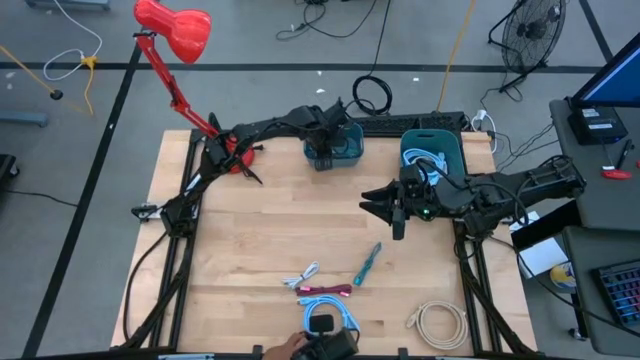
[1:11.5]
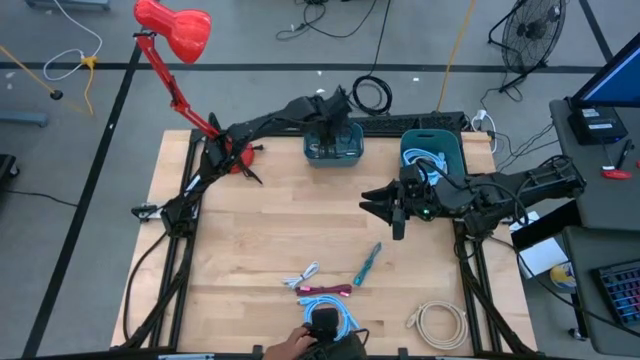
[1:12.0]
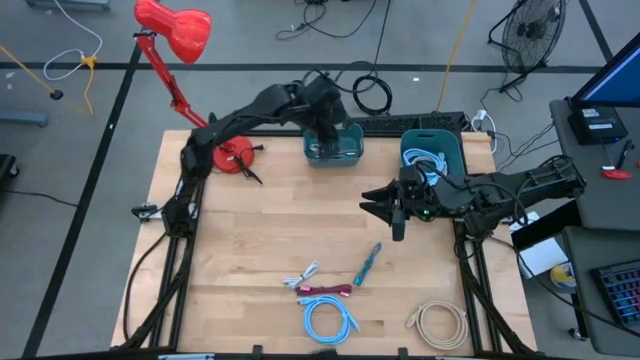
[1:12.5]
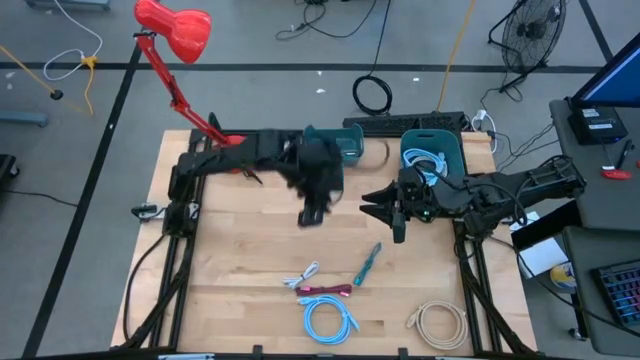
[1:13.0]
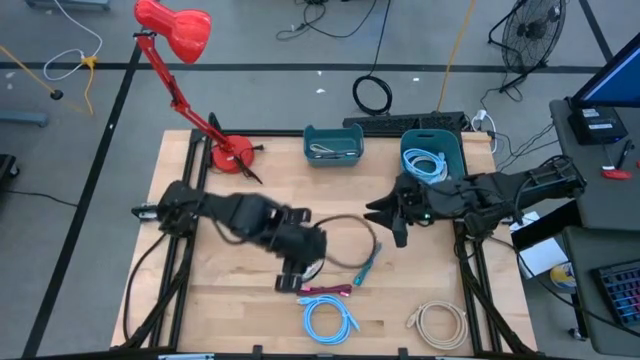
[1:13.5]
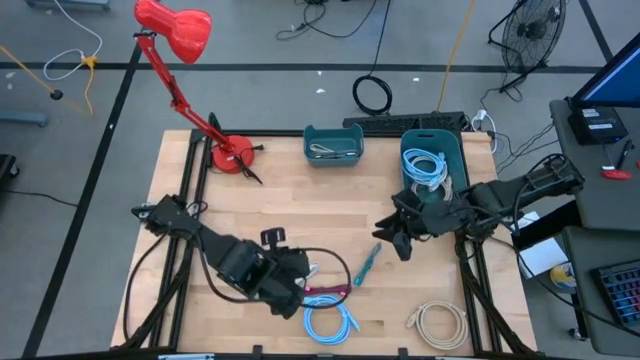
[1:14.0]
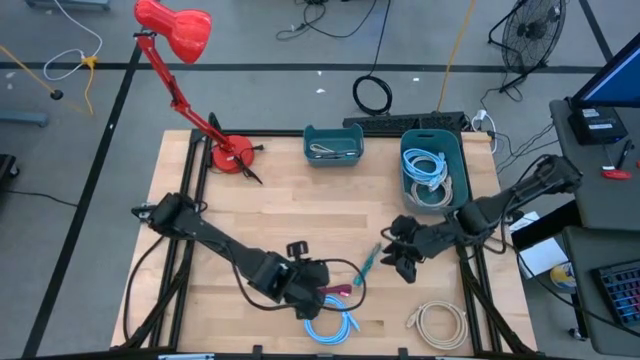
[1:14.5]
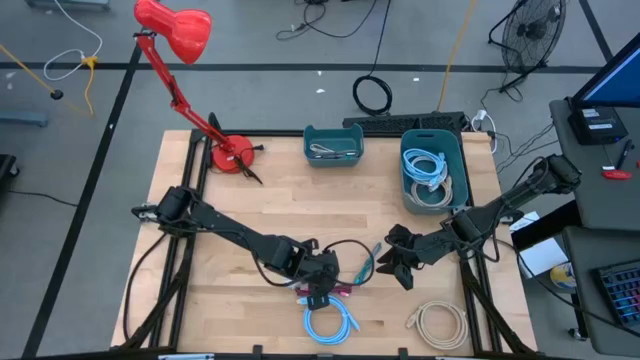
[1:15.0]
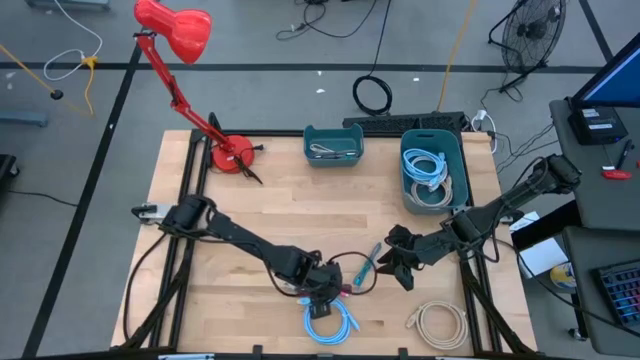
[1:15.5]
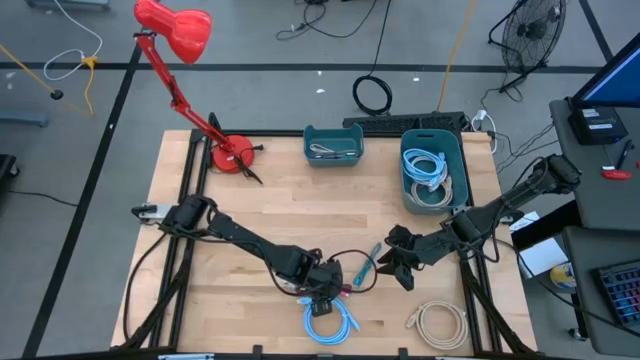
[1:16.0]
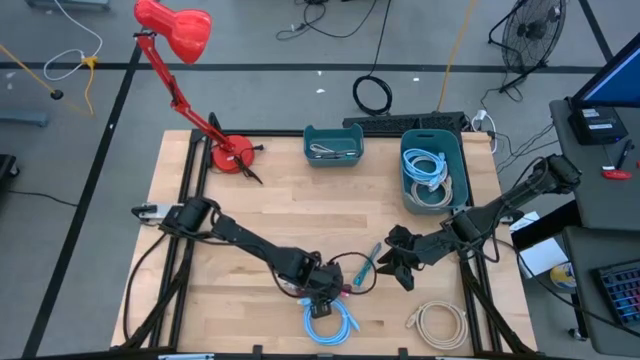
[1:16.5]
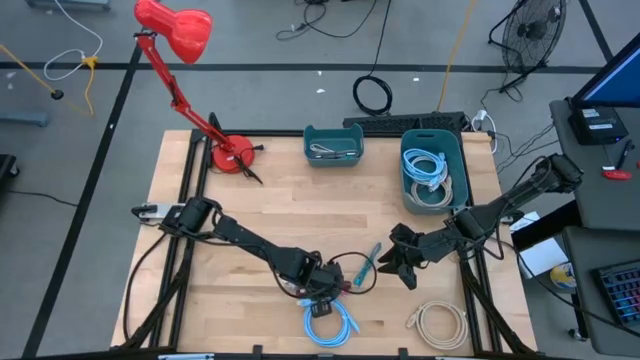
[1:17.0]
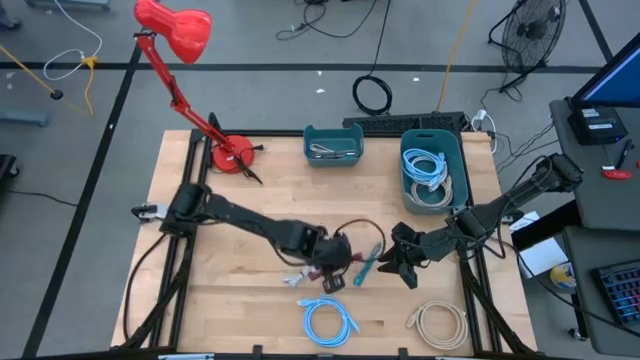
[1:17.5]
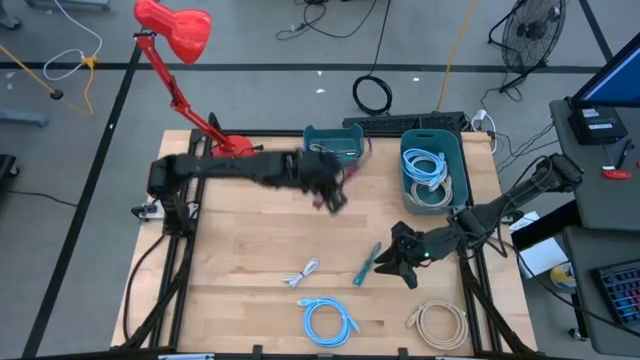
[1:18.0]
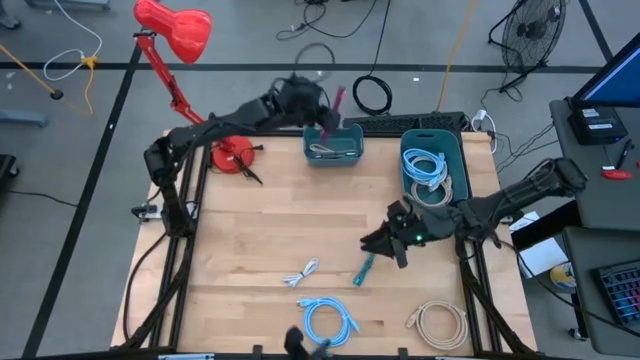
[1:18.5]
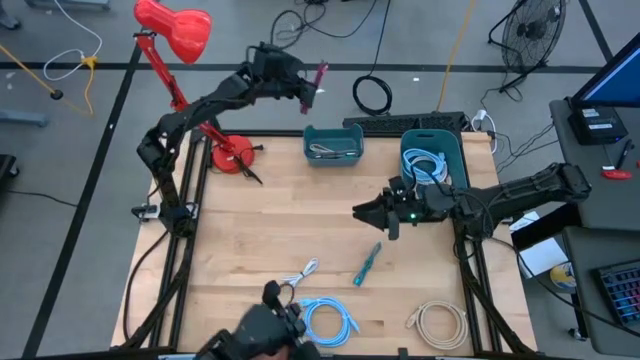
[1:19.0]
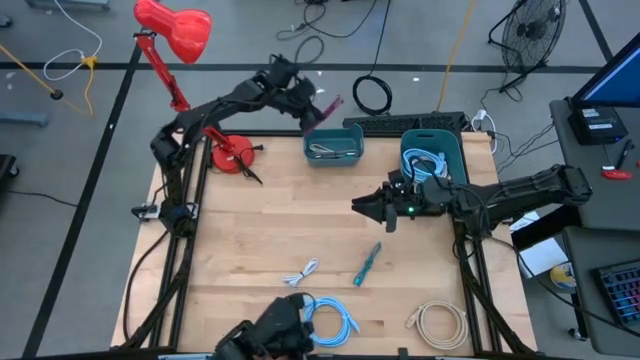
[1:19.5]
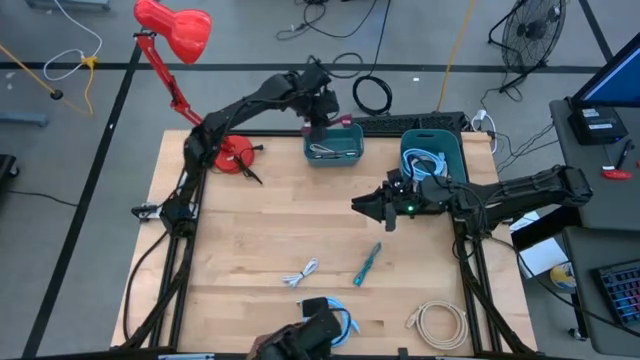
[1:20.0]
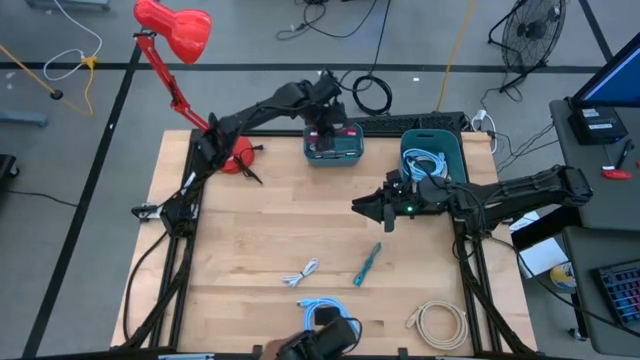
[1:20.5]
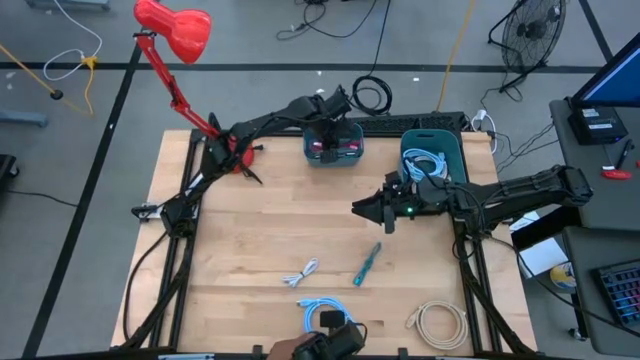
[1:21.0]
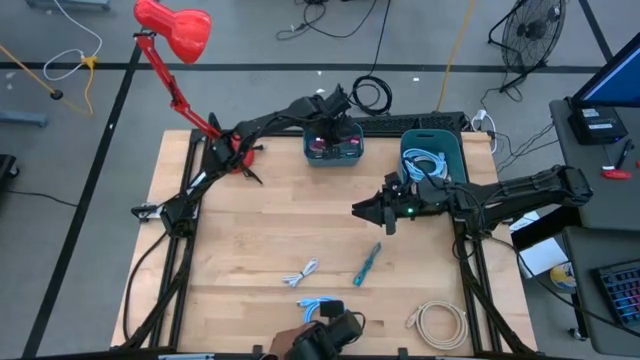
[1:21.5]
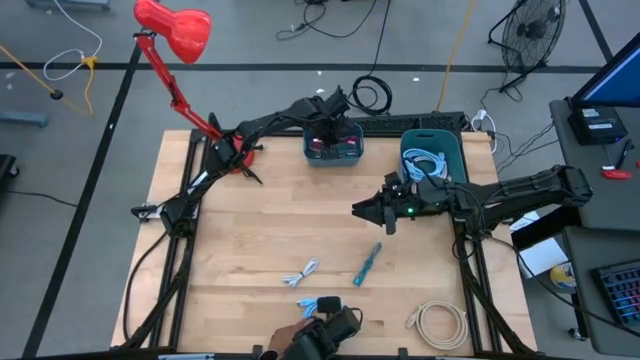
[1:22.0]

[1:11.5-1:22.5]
Task: Pick & Place USB Port
Put the red charger cable into the left blue bin

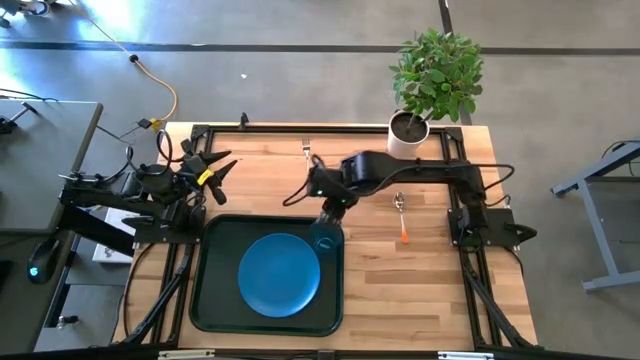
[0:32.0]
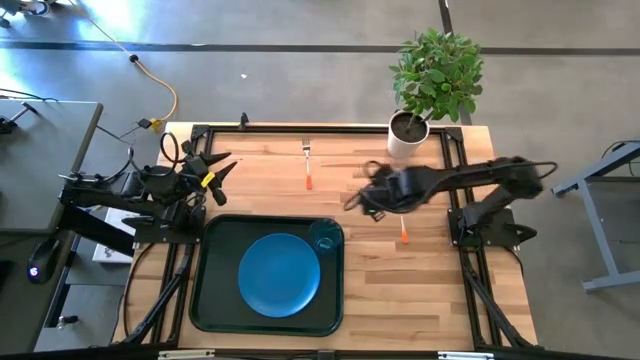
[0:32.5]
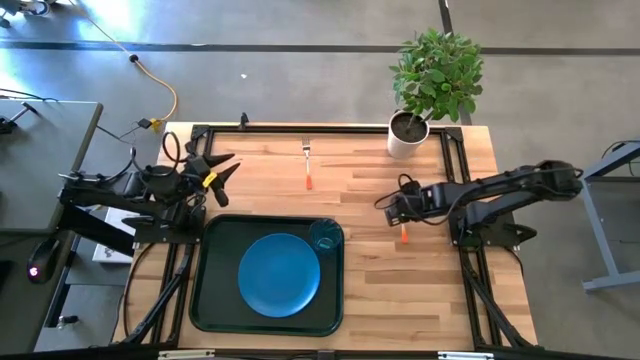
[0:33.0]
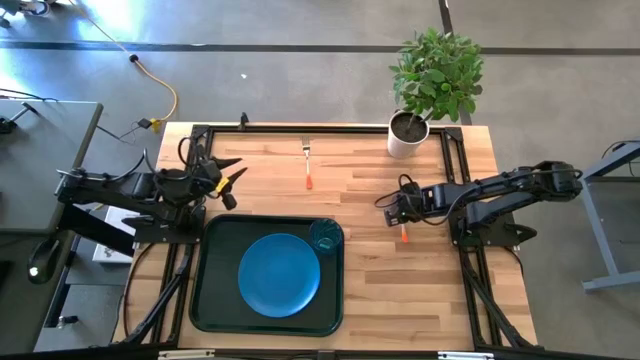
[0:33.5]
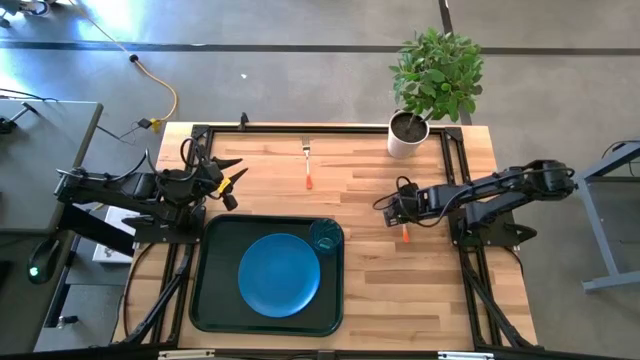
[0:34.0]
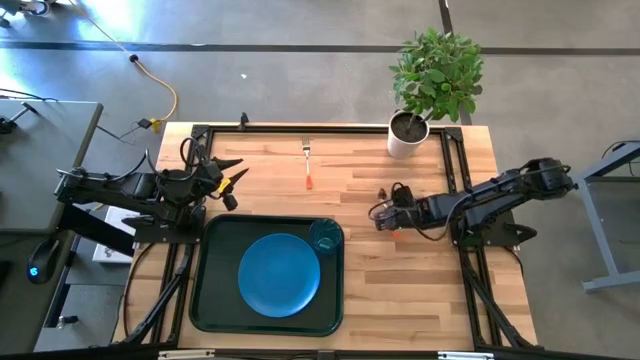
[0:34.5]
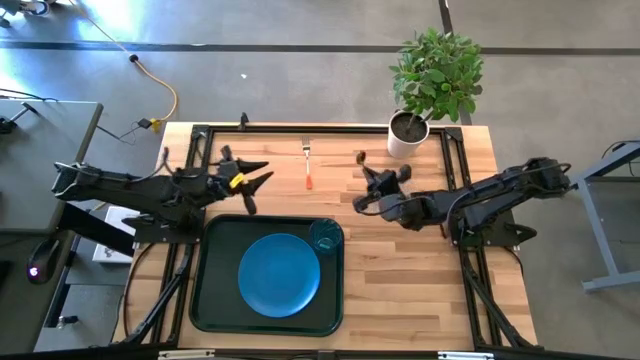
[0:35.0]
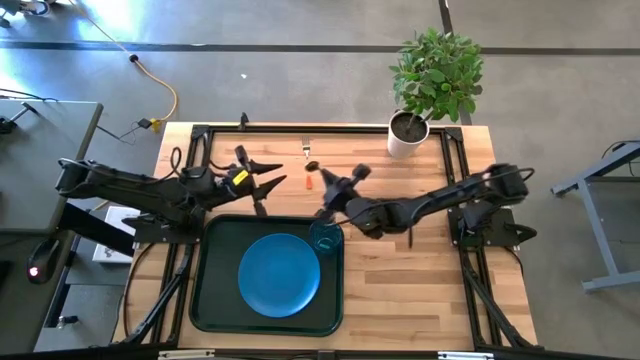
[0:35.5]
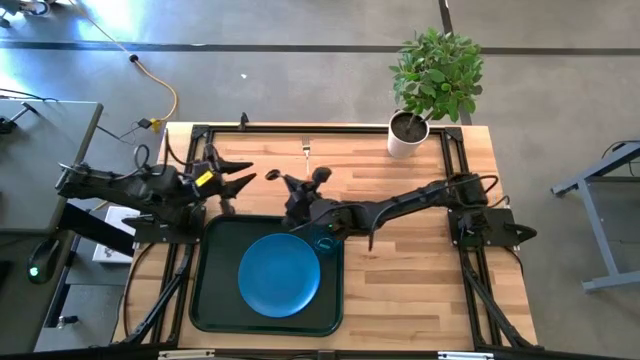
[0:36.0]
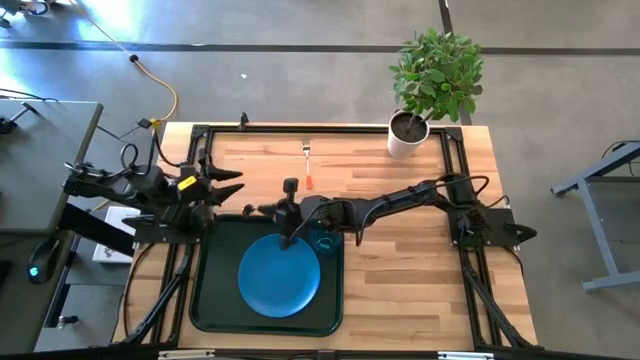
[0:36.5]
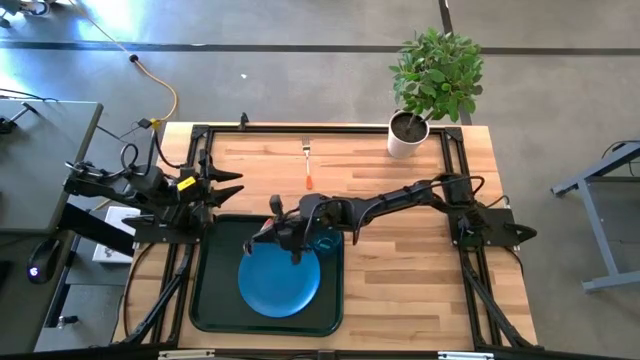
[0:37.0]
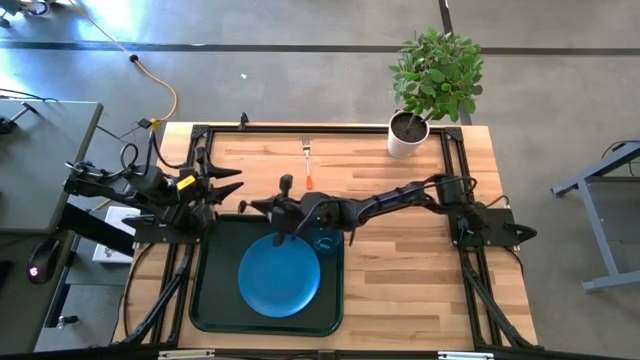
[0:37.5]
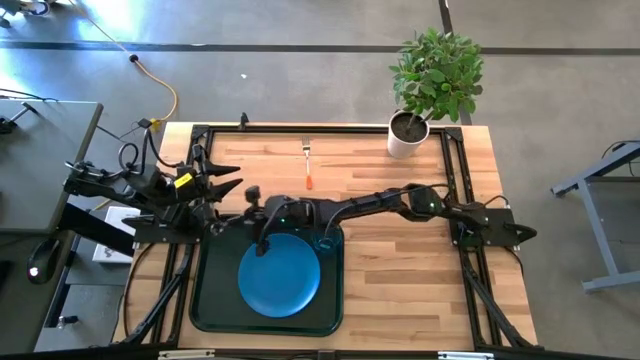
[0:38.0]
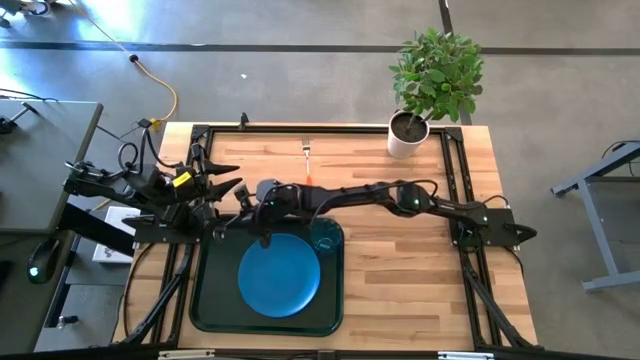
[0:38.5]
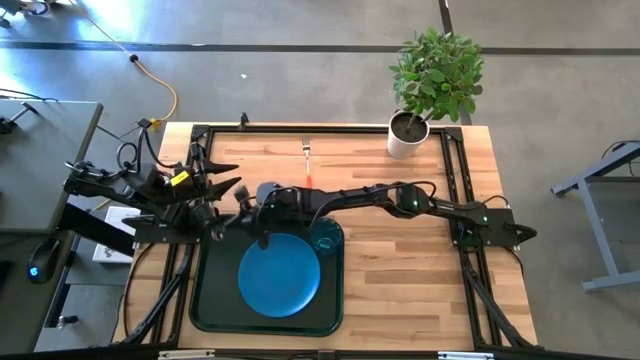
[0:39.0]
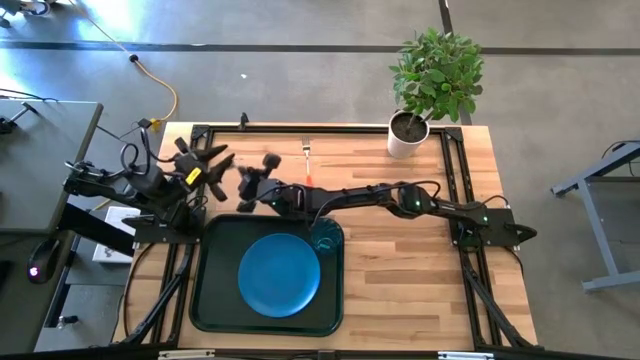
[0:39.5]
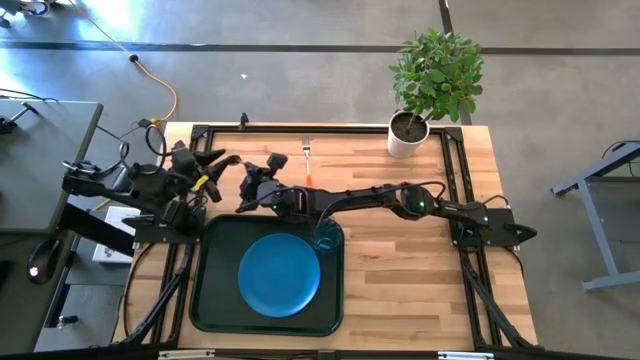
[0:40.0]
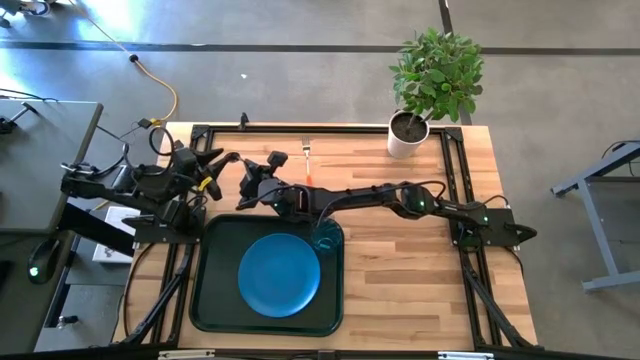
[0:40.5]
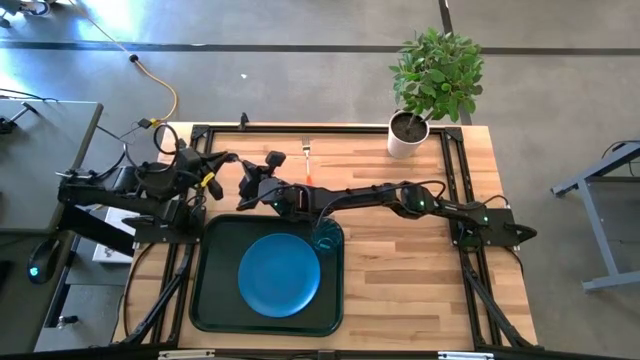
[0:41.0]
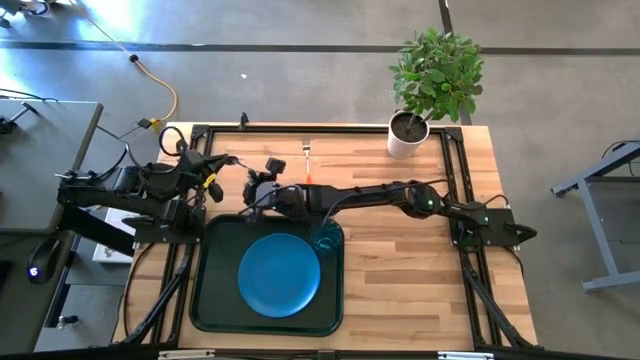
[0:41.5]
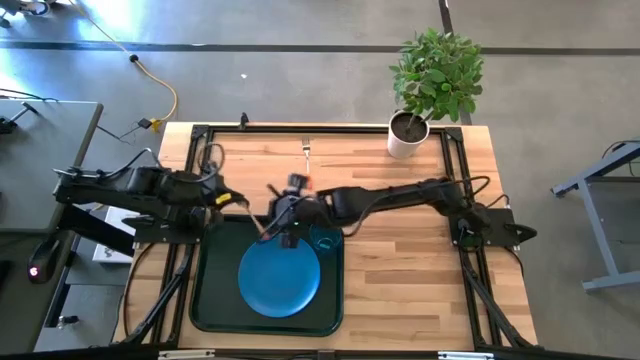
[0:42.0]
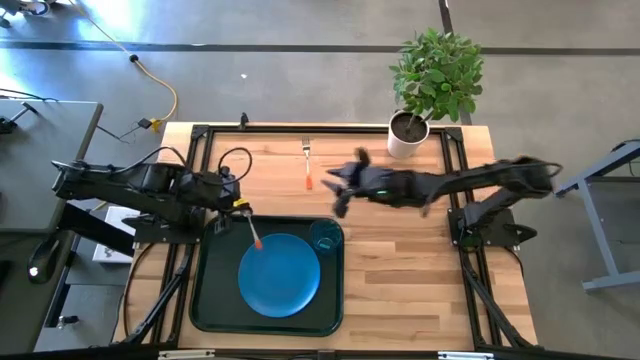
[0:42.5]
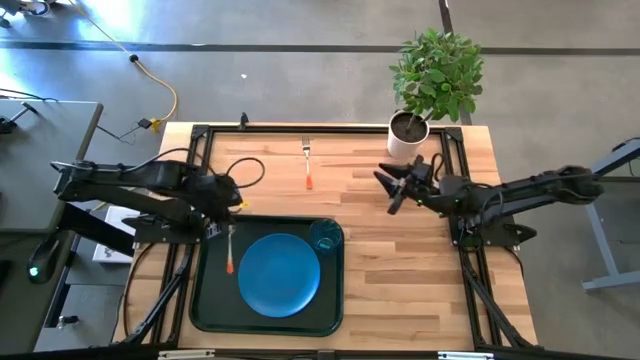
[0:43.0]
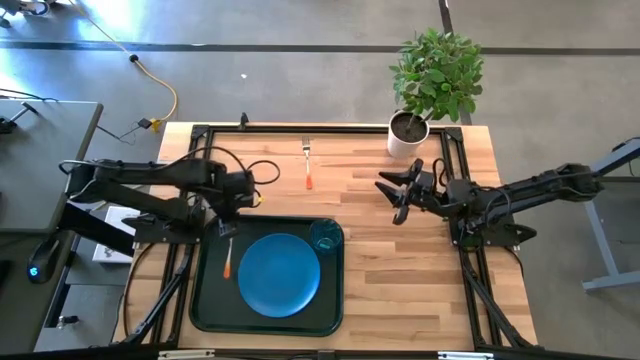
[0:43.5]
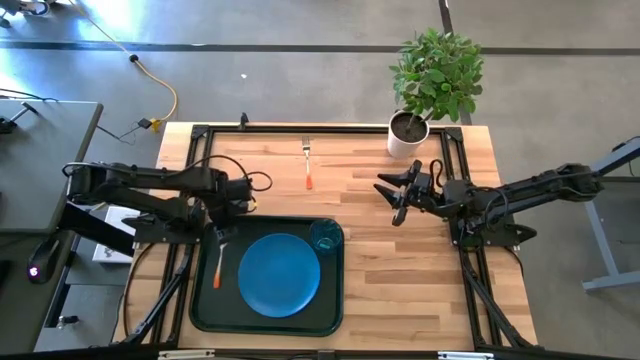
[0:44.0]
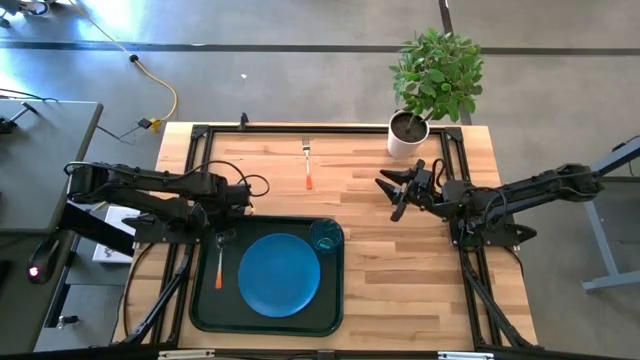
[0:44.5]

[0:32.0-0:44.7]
Task: Pick and place plate/cup/fork/spoon on tray
Put the orange spoon on the black tray to the left of the blue plate
